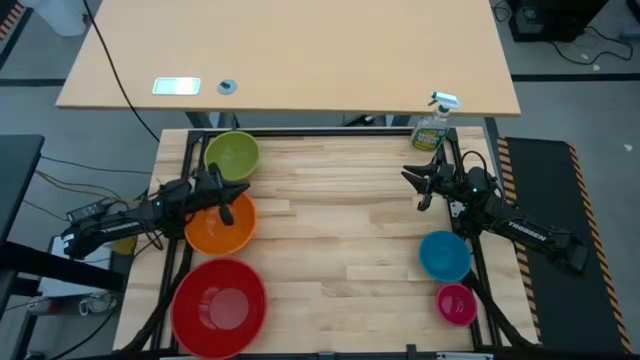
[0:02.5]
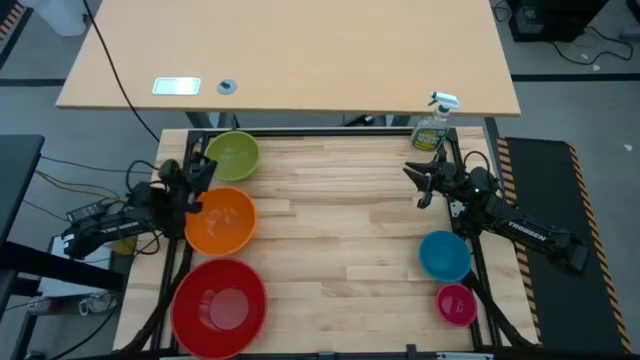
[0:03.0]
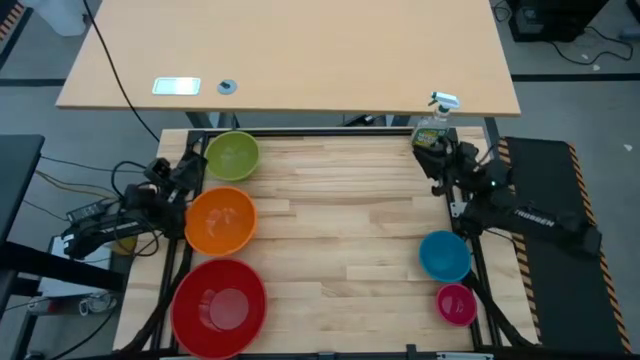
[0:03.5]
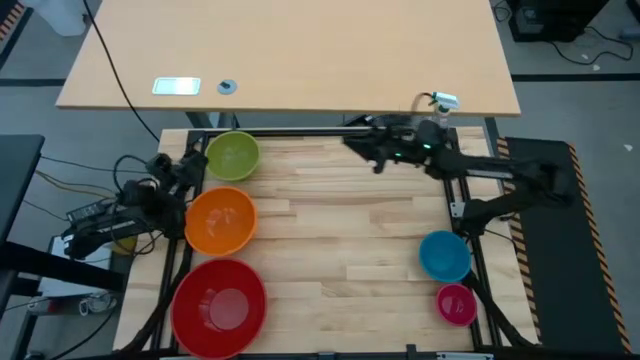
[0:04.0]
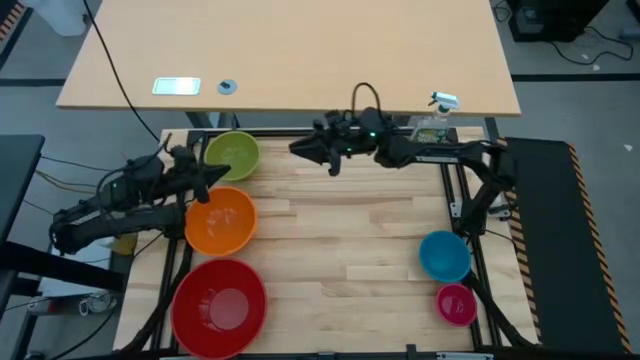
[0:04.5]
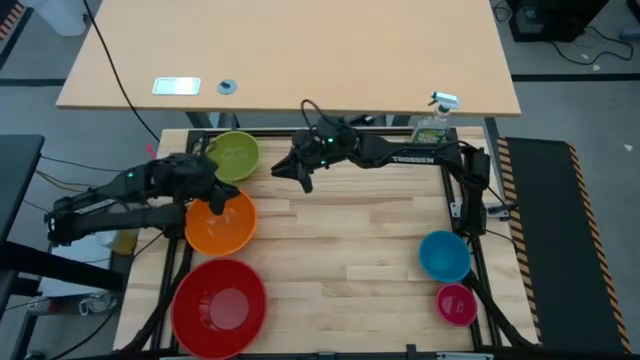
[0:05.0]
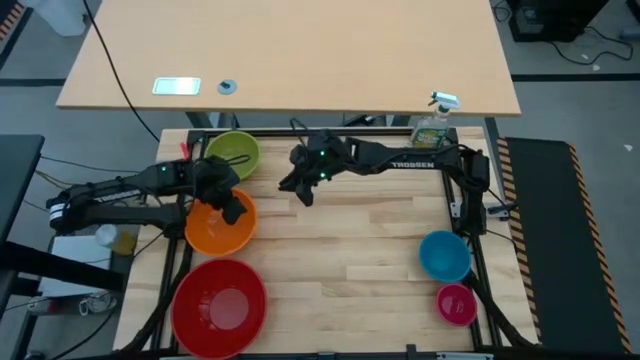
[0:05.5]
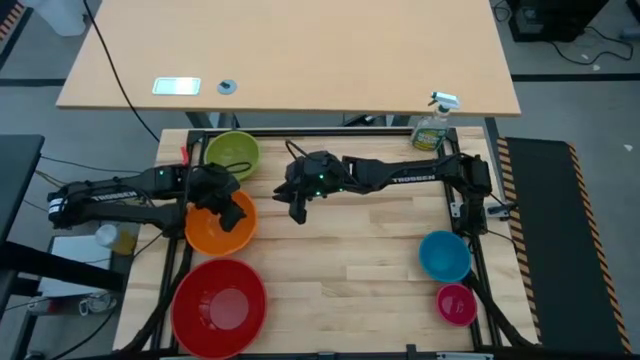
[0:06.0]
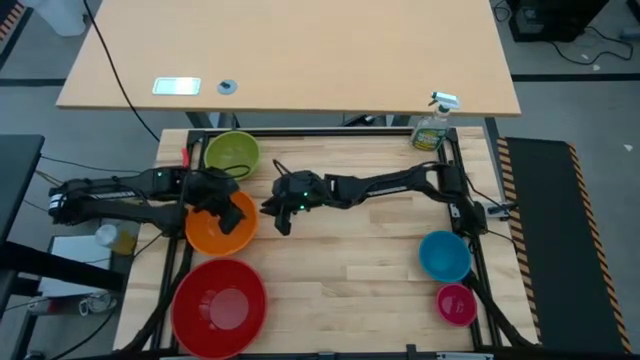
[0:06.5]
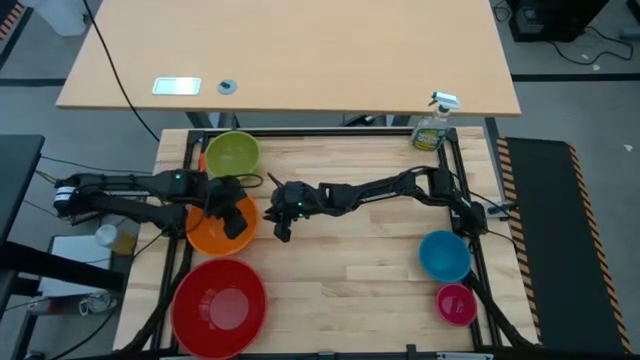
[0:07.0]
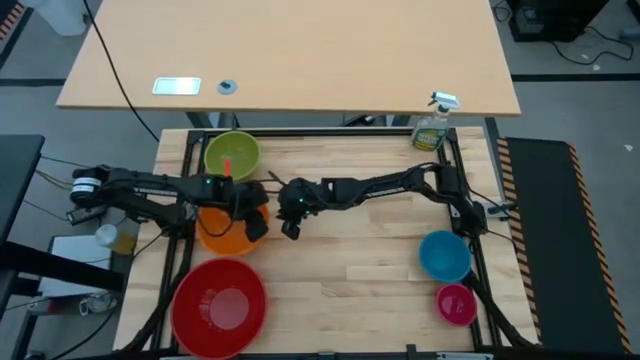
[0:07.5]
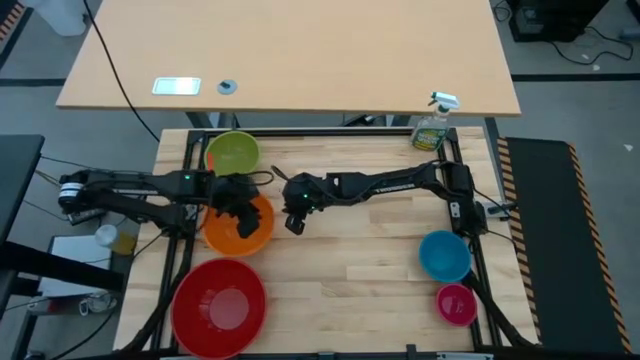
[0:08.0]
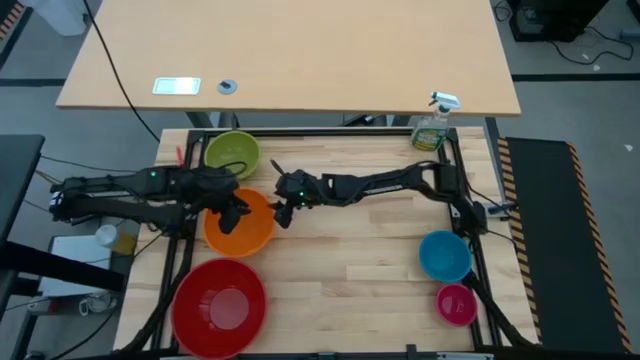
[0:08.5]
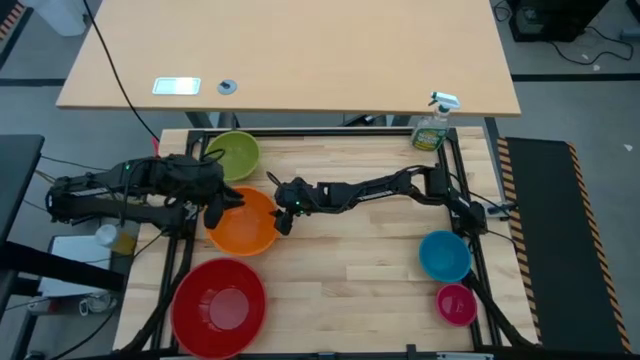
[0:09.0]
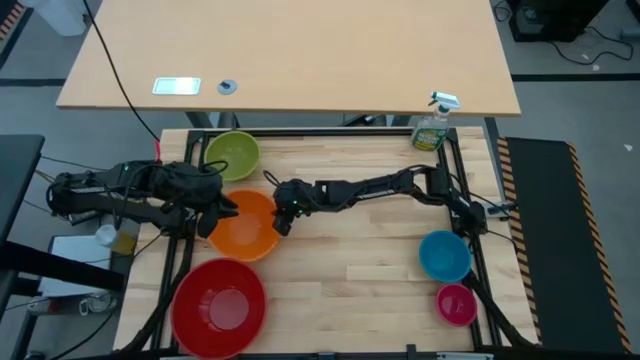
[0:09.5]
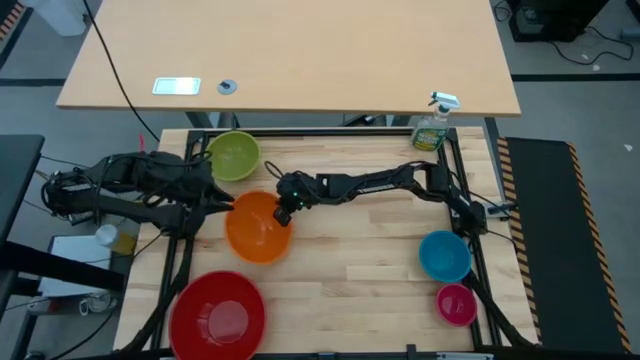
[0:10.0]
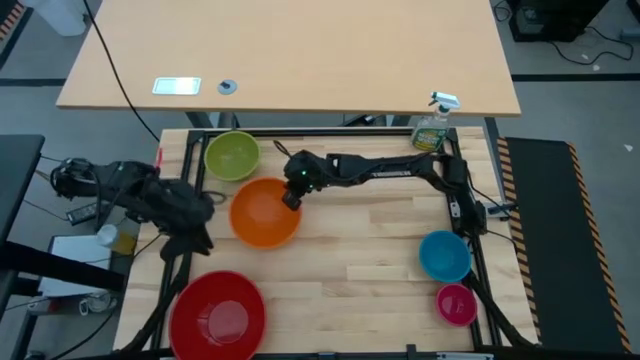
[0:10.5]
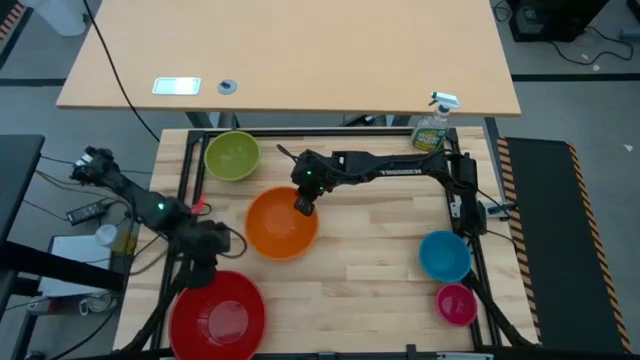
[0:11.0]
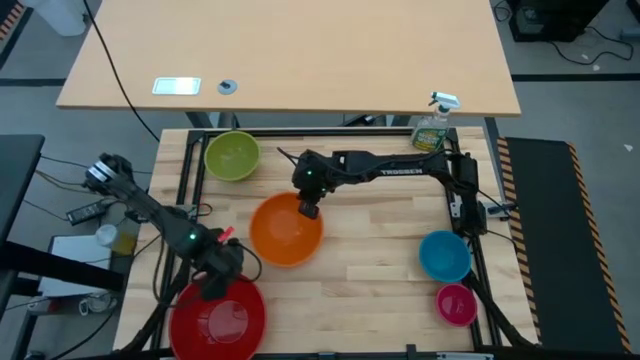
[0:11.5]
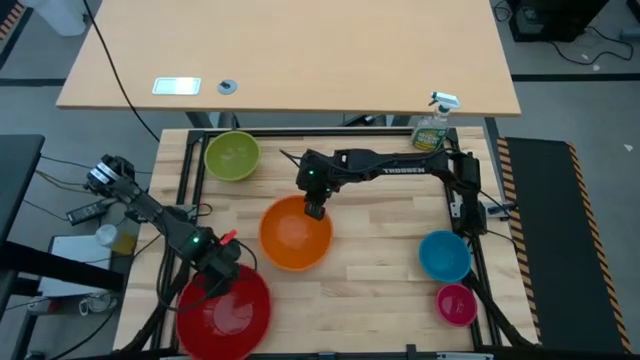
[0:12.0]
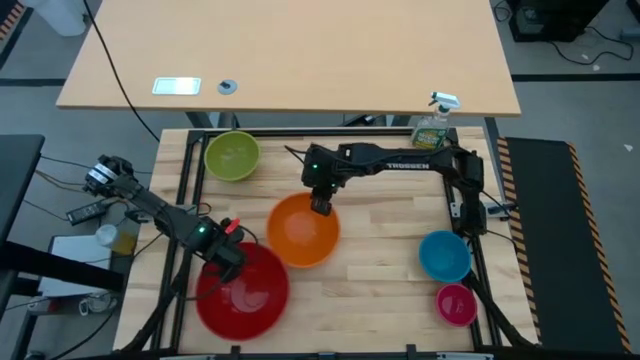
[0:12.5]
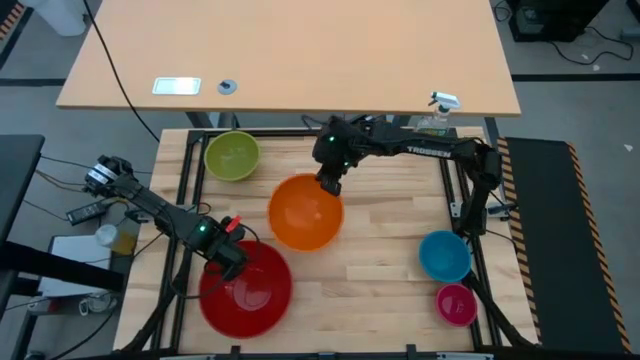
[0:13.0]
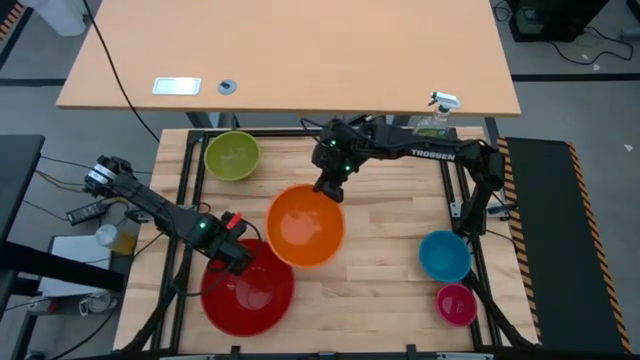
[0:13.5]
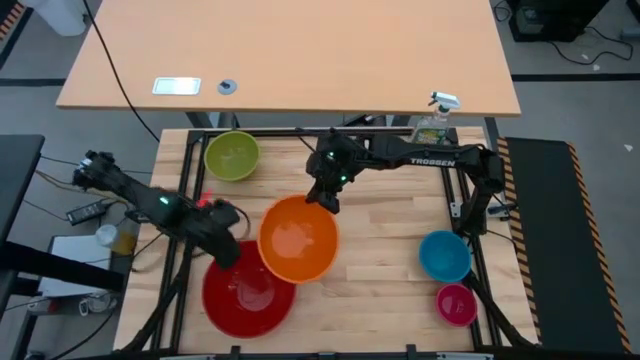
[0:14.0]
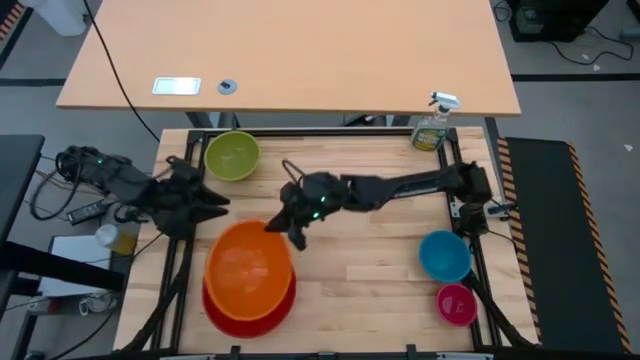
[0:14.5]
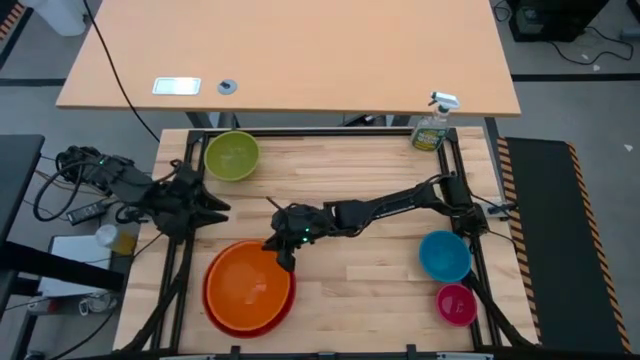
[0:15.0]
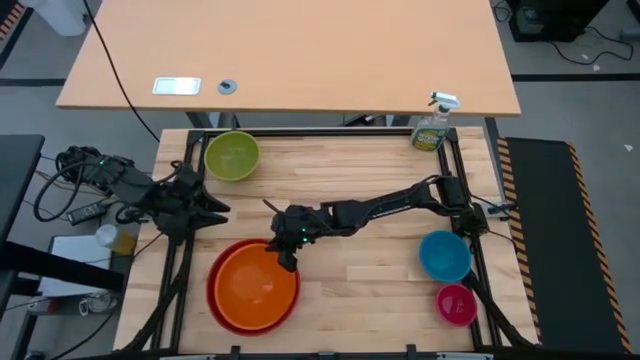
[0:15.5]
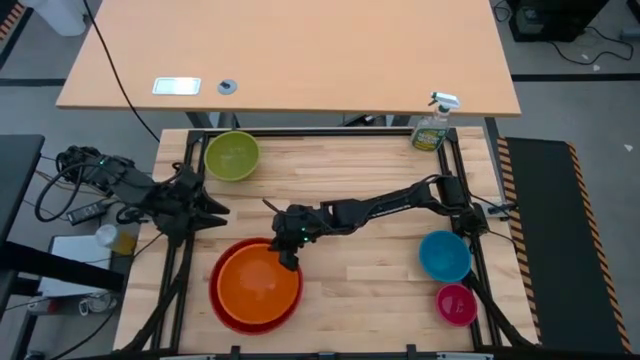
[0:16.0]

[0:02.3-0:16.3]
Stack the orange bowl into the red bowl

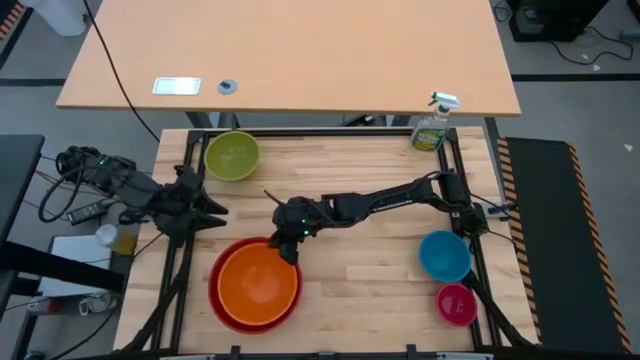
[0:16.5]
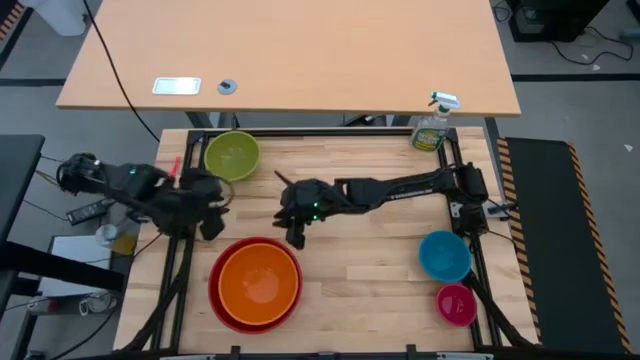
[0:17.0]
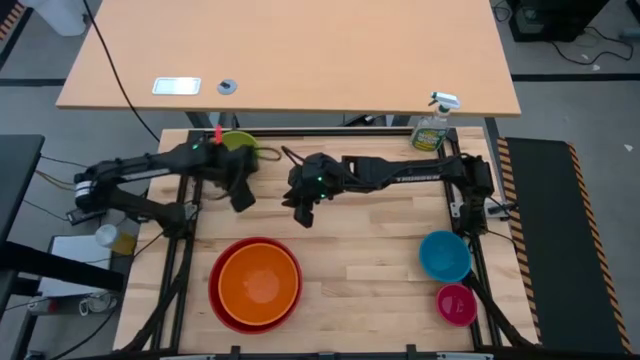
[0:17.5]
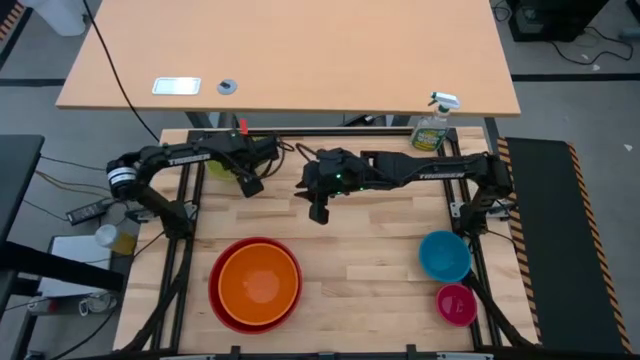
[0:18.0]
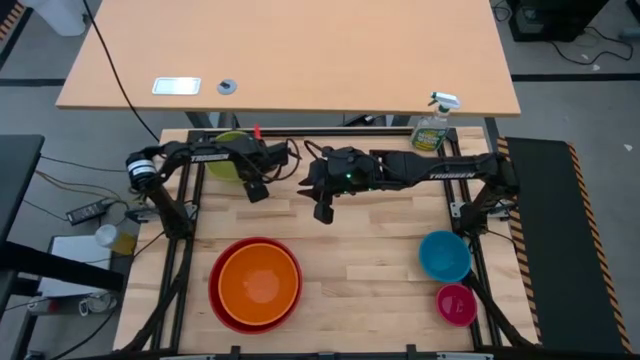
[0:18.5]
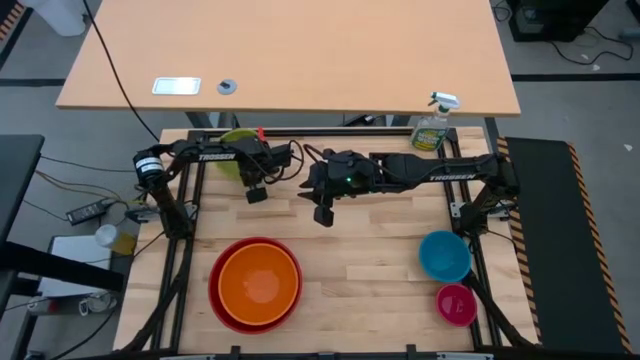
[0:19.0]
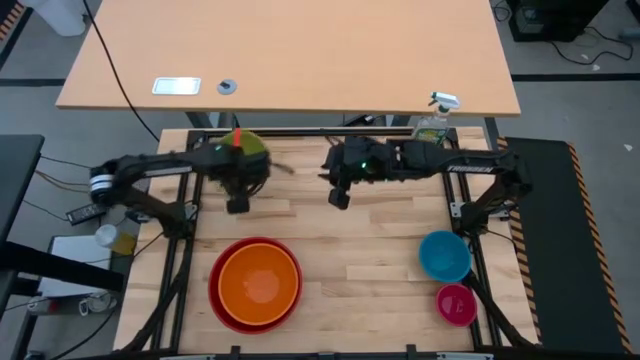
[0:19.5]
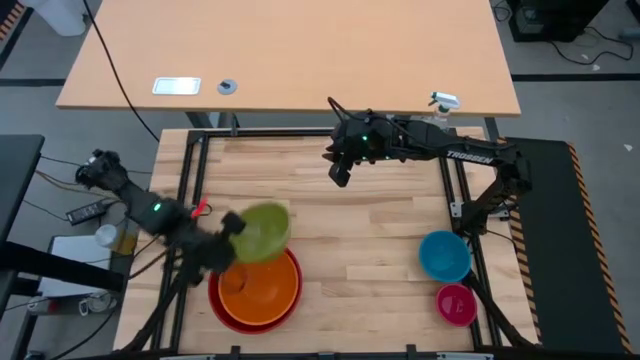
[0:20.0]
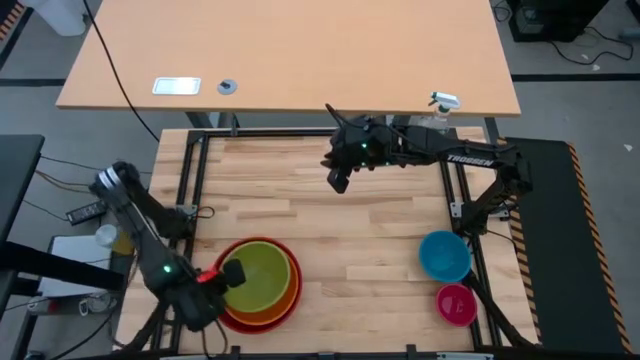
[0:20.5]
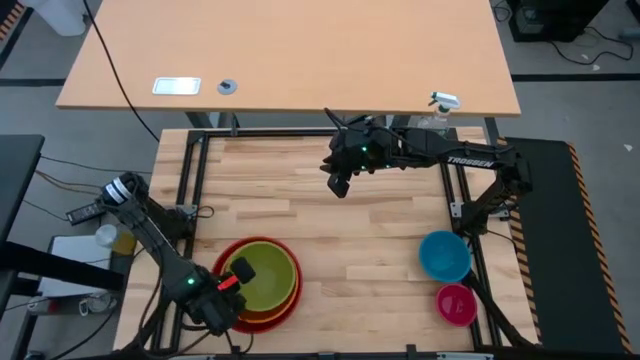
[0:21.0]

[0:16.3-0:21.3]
Stack the green bowl into the orange bowl

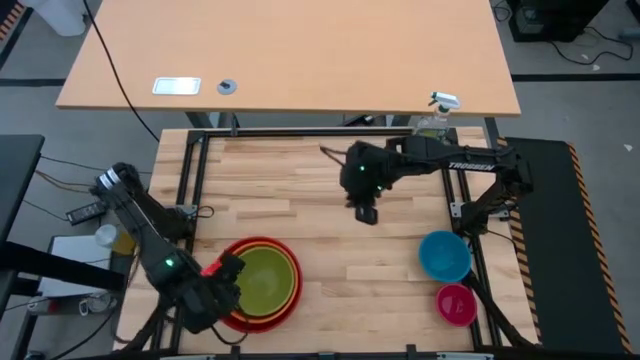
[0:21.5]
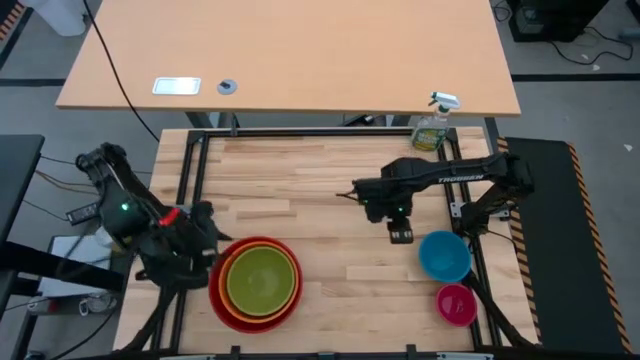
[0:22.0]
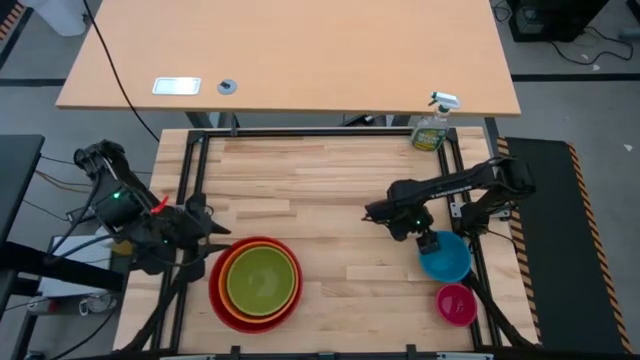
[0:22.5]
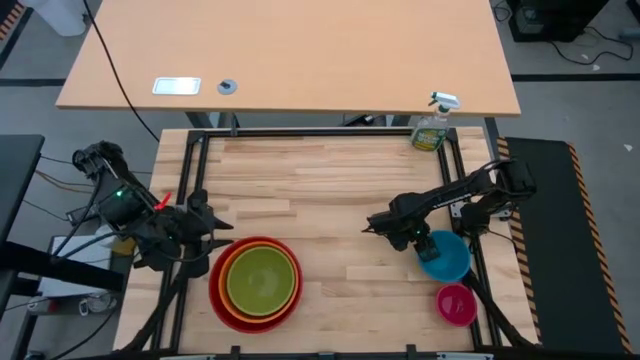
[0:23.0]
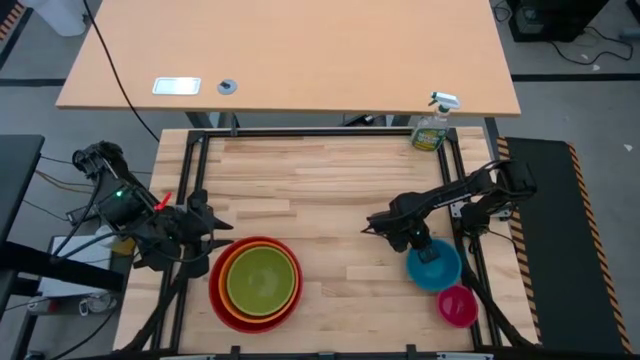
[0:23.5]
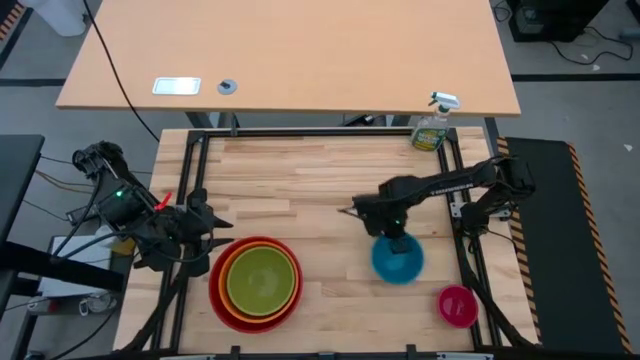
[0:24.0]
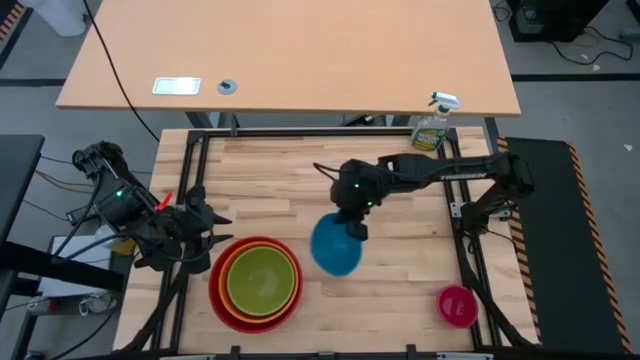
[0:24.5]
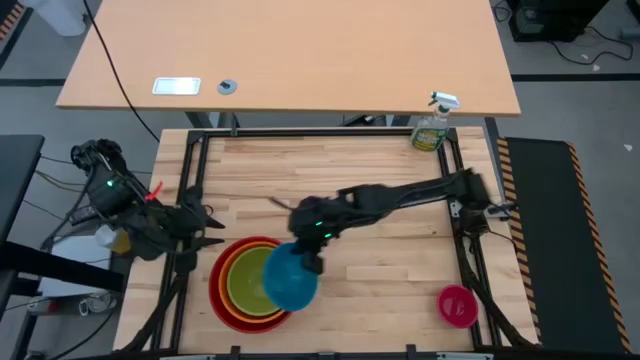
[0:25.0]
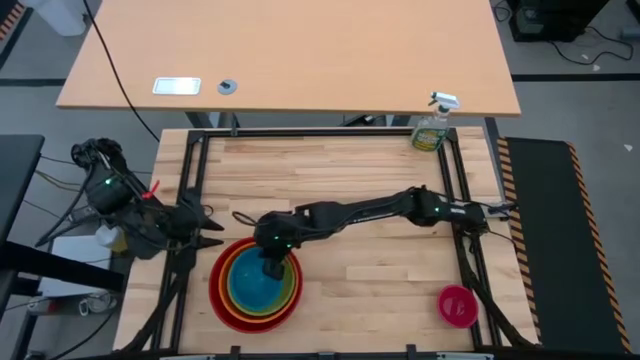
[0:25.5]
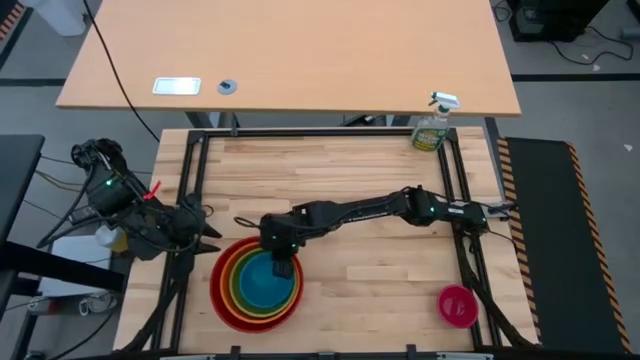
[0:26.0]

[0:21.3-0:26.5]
Stack the right blue bowl into the green bowl
